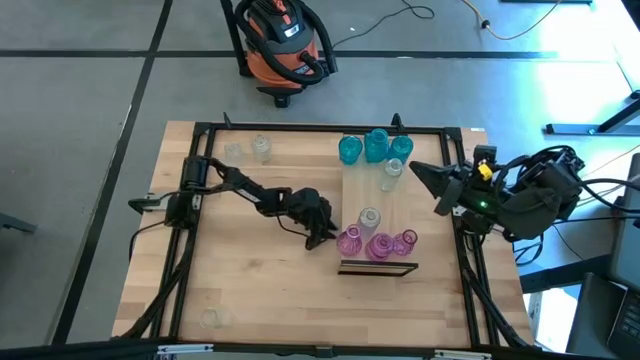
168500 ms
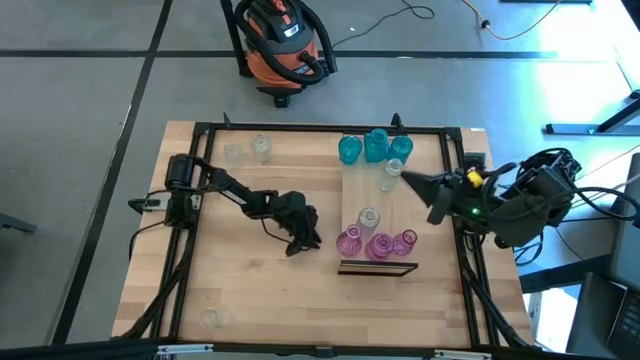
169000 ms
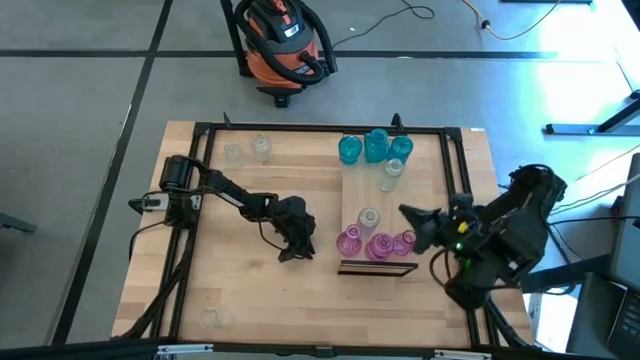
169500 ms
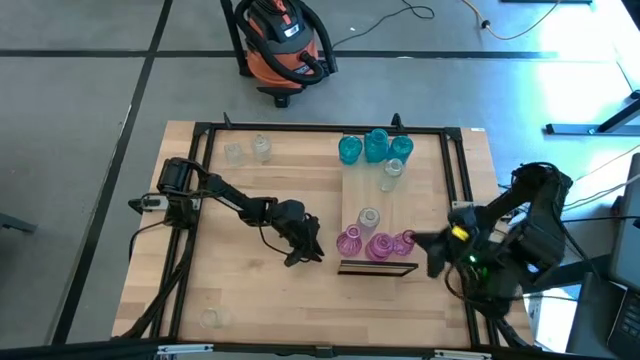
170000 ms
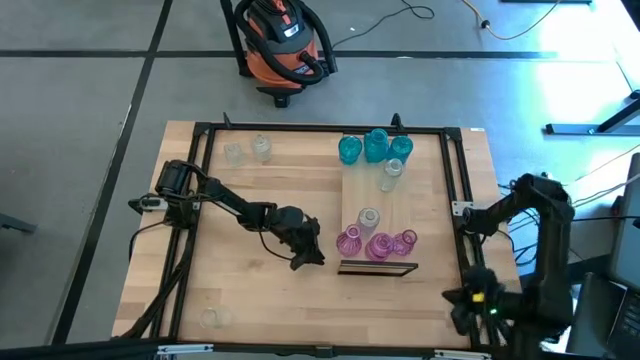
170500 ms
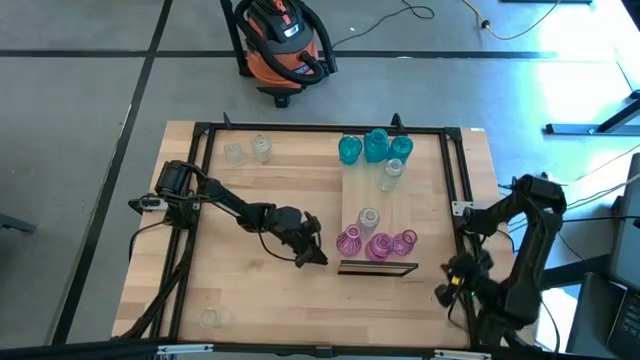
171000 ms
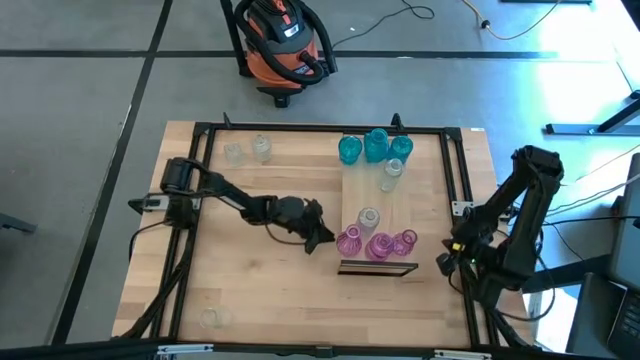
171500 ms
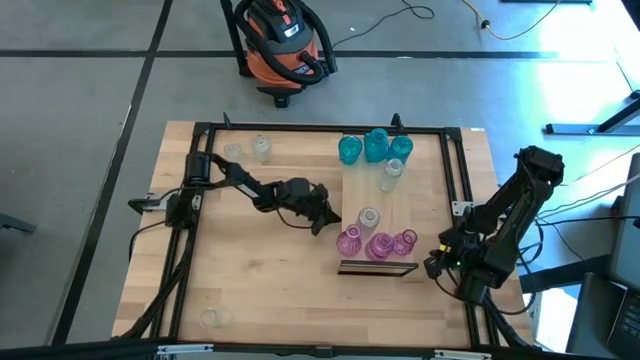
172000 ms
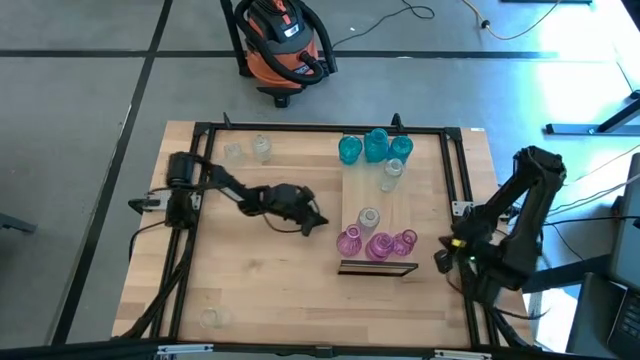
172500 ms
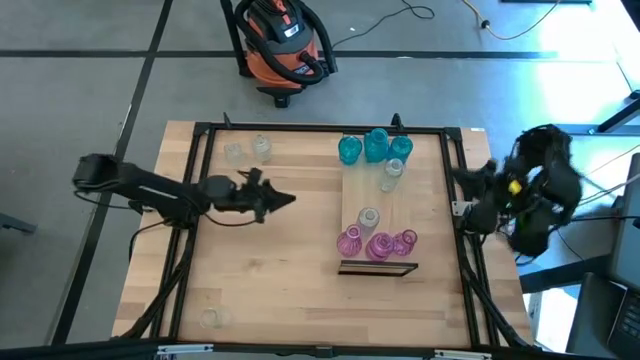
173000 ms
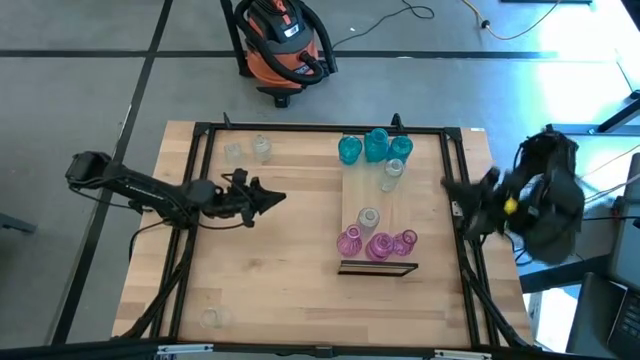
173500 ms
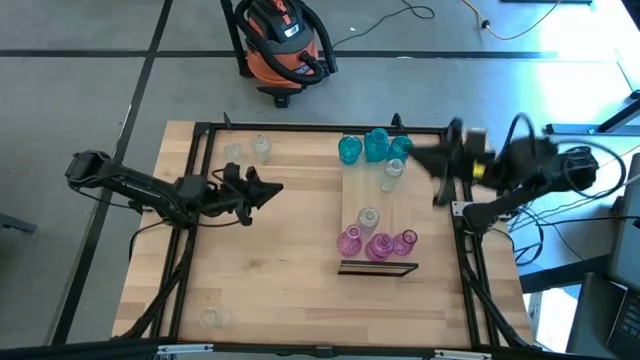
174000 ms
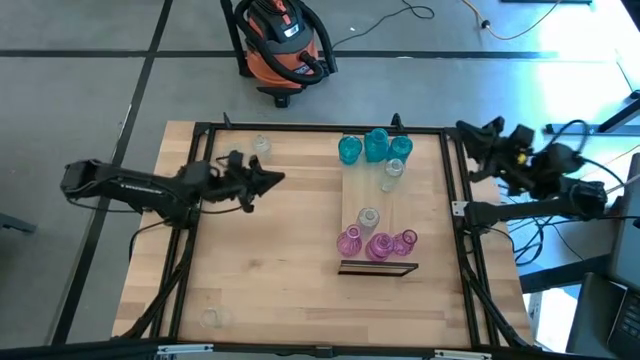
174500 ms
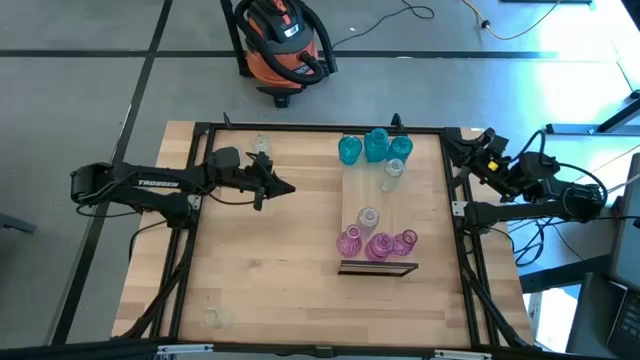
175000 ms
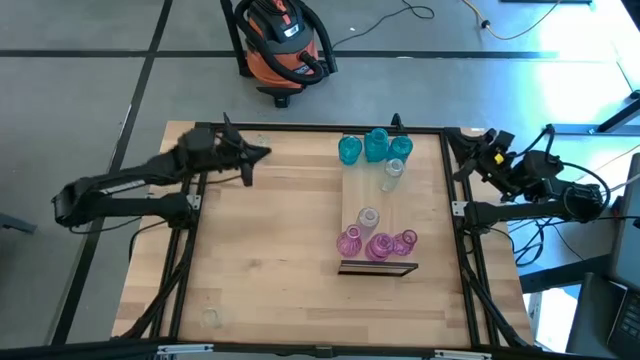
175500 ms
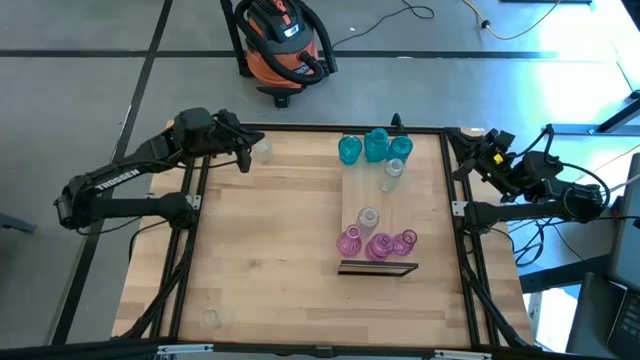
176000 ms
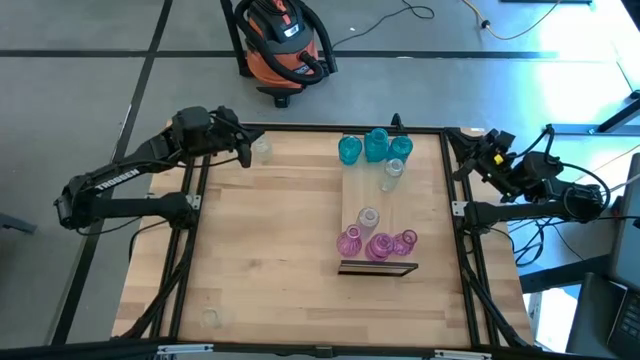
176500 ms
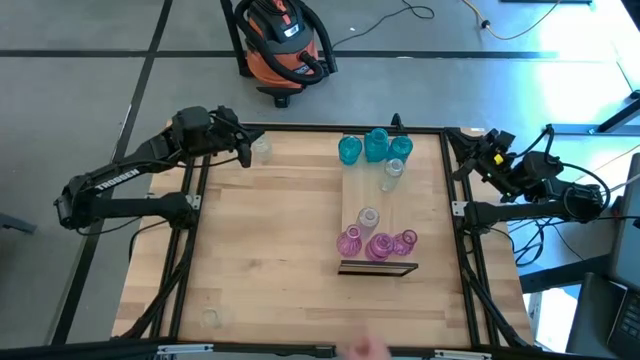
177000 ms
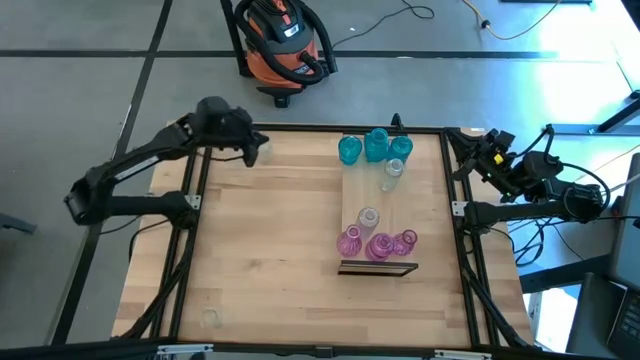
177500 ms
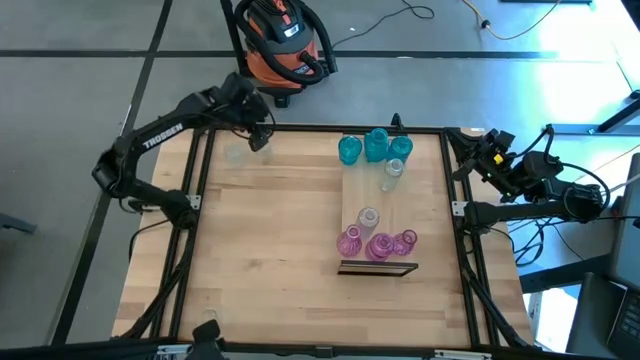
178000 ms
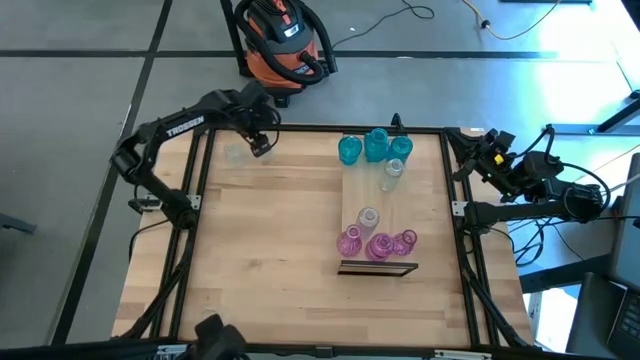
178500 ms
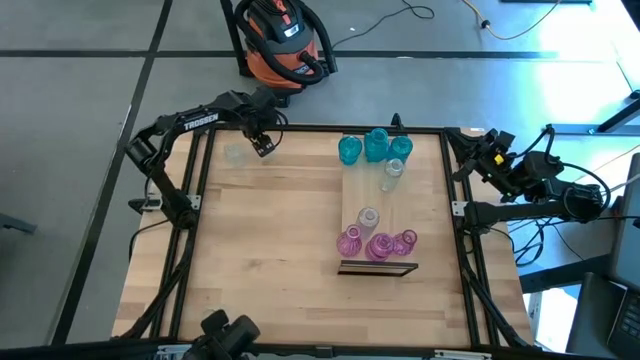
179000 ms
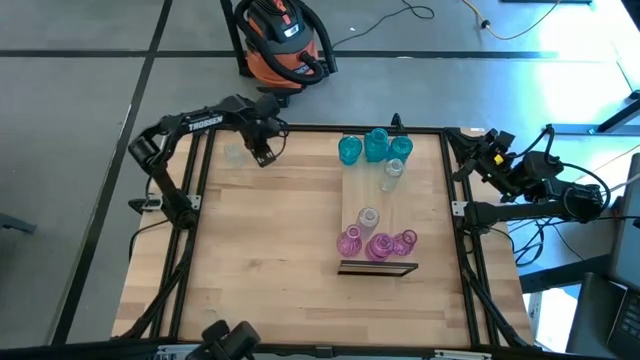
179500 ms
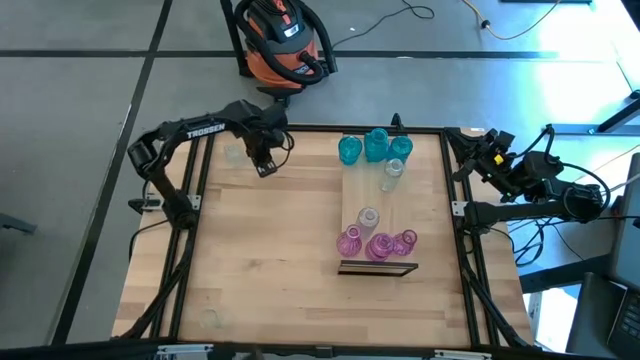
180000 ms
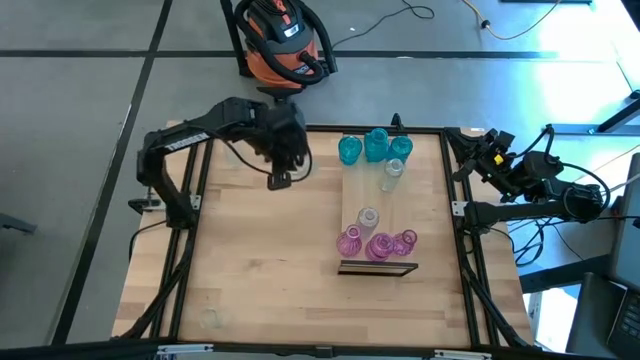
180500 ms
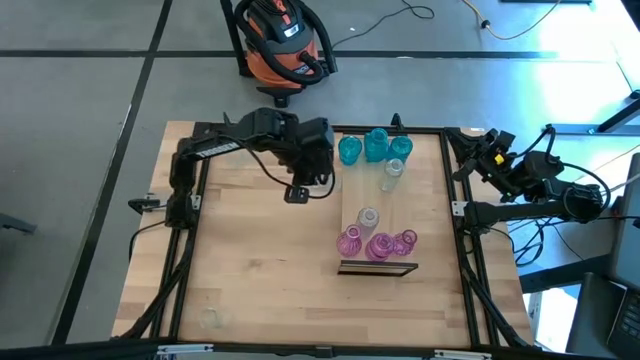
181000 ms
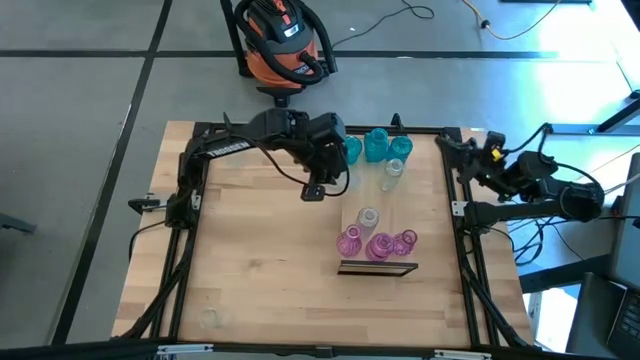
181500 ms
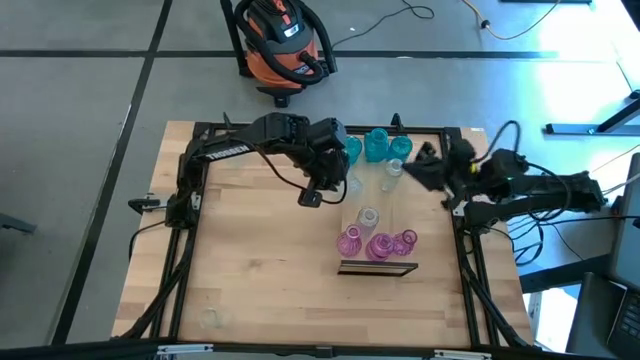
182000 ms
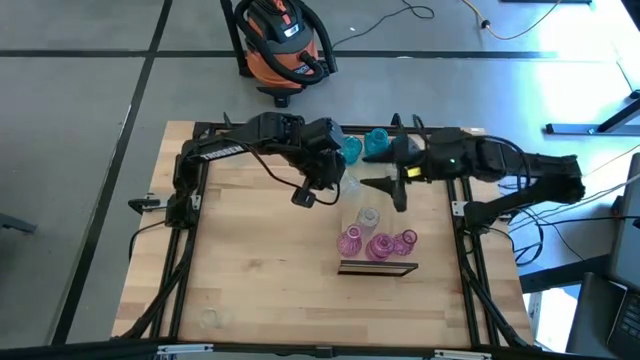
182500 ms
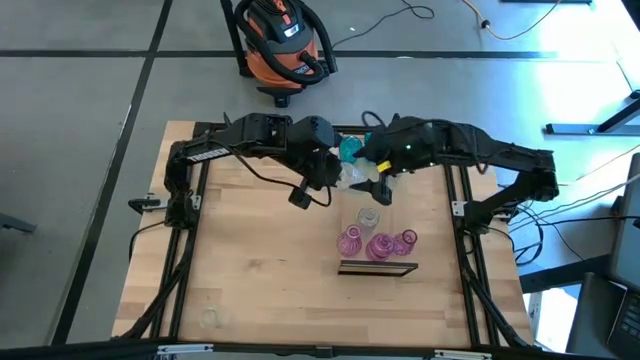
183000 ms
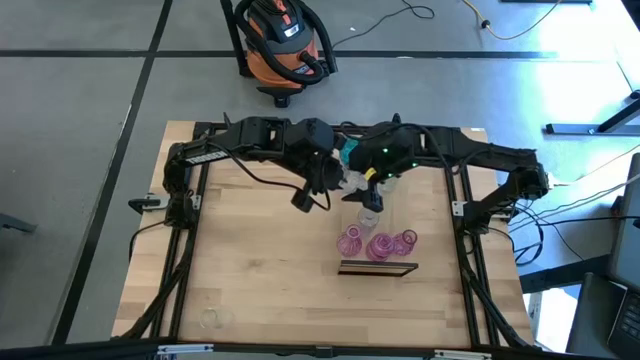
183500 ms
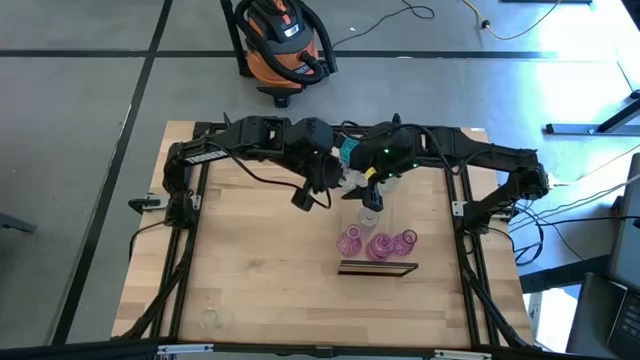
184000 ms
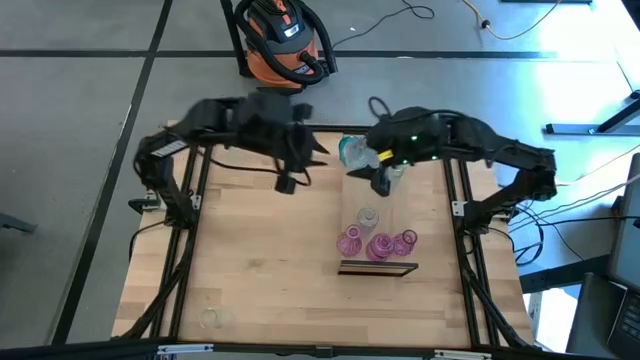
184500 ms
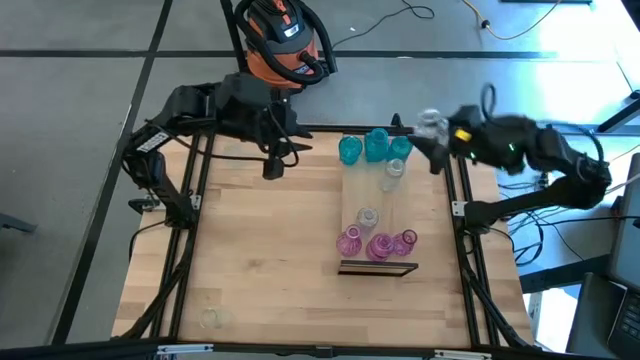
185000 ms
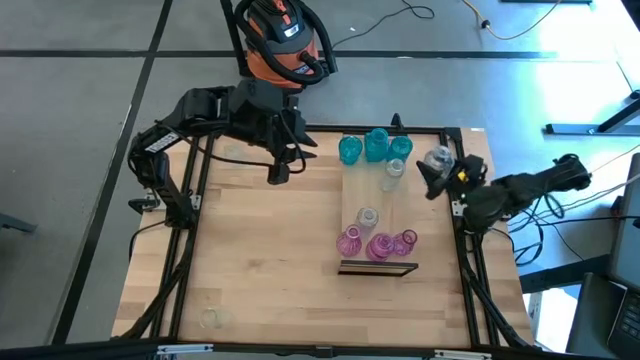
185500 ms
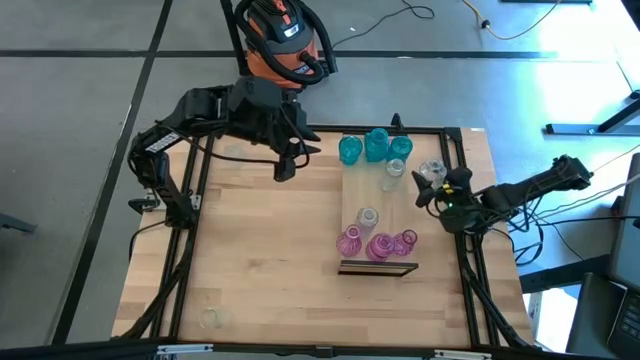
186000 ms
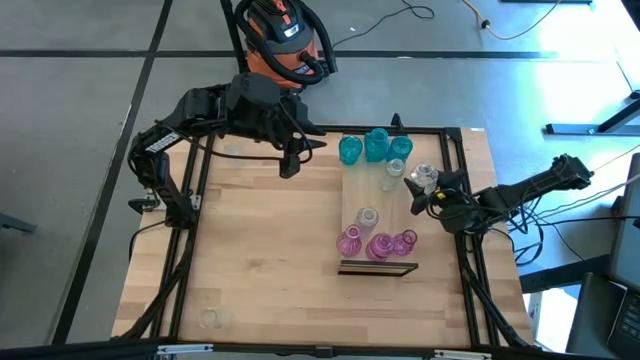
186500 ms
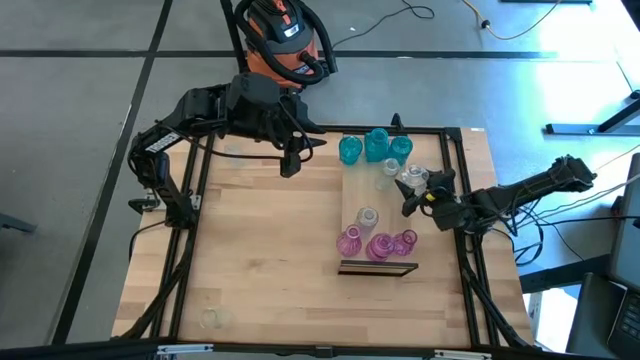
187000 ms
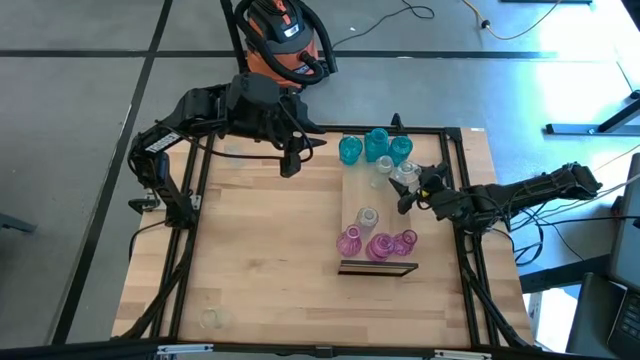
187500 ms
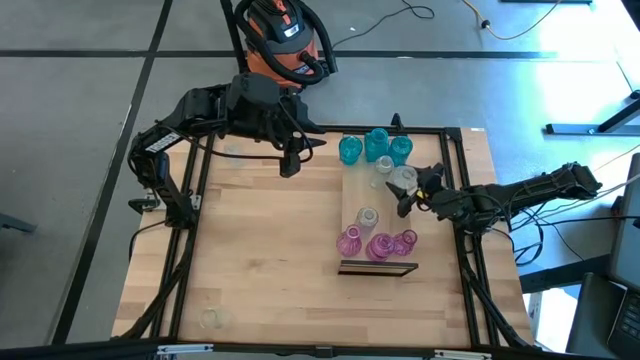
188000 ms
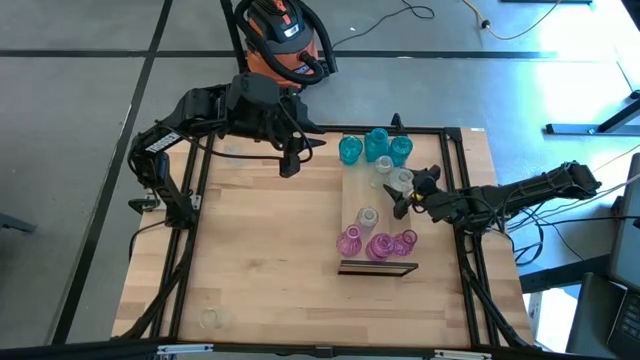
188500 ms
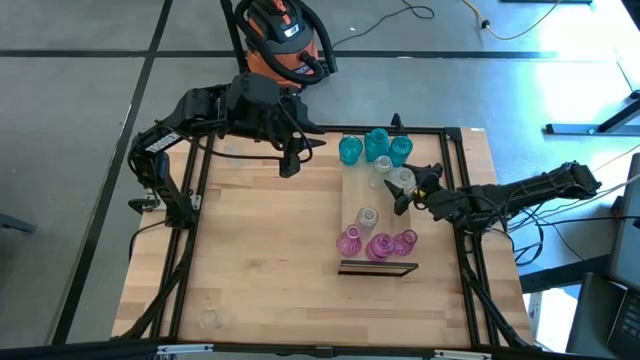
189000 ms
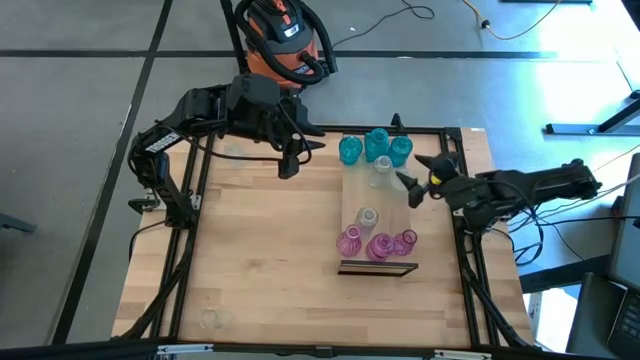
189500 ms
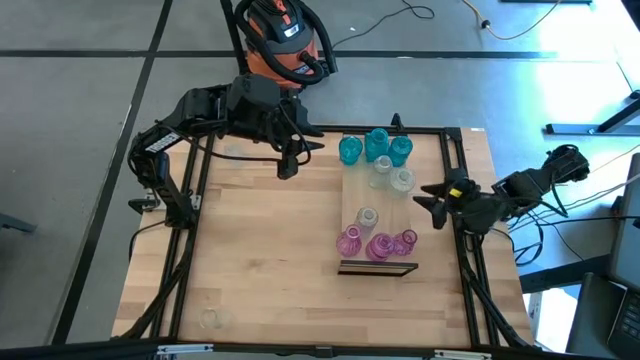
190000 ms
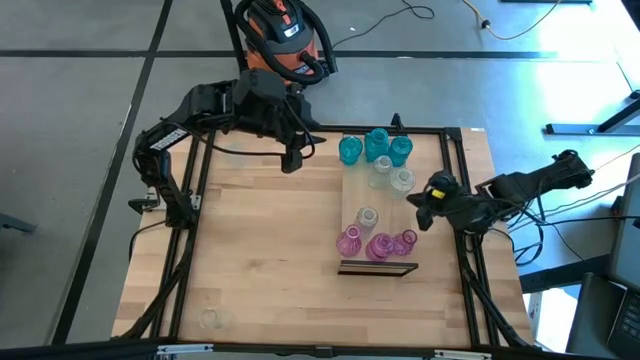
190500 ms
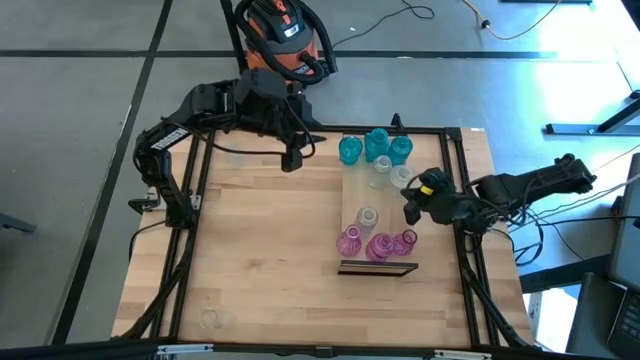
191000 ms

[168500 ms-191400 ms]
Task: sort vases onto shelf
Put the transparent vase on the shelf aligned with the other transparent vase
